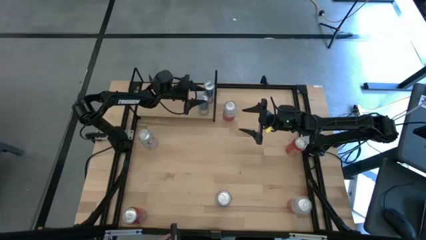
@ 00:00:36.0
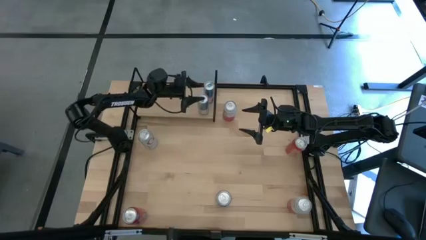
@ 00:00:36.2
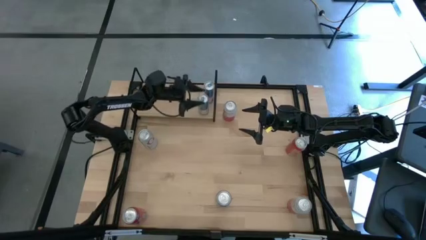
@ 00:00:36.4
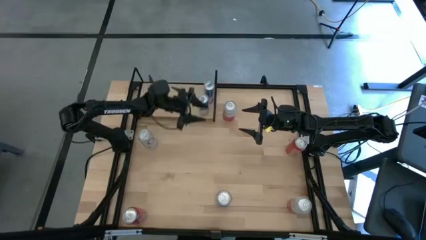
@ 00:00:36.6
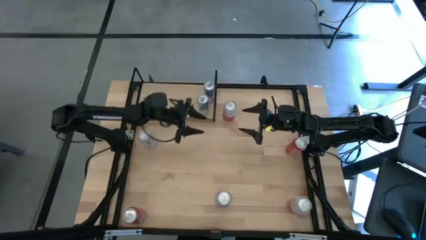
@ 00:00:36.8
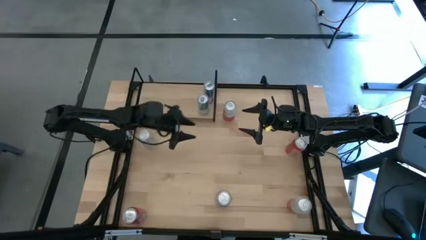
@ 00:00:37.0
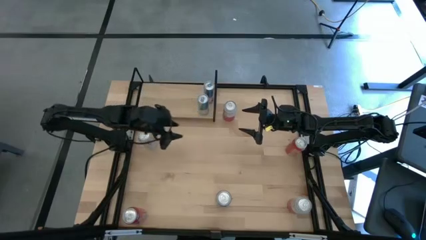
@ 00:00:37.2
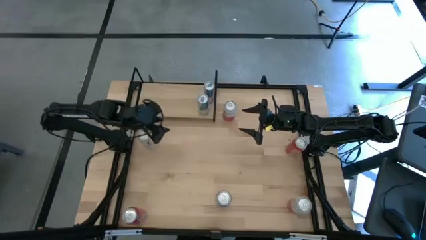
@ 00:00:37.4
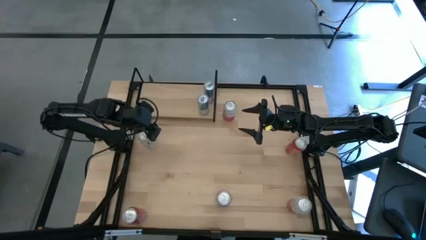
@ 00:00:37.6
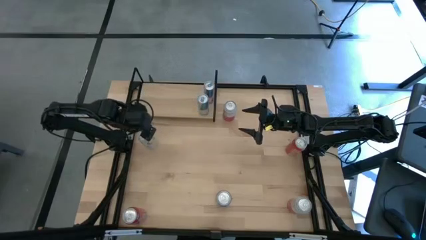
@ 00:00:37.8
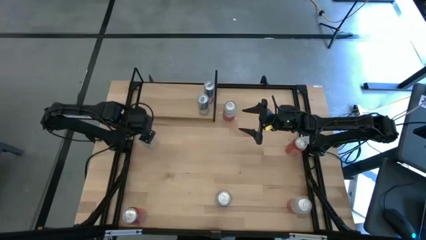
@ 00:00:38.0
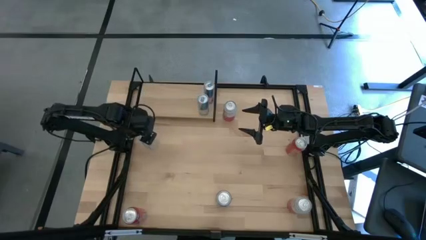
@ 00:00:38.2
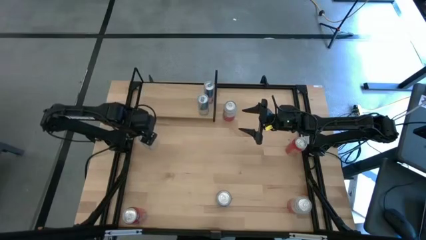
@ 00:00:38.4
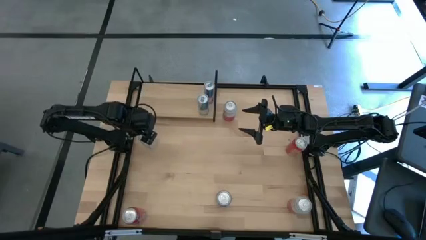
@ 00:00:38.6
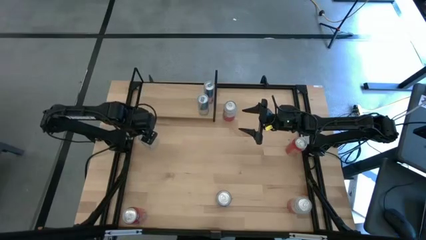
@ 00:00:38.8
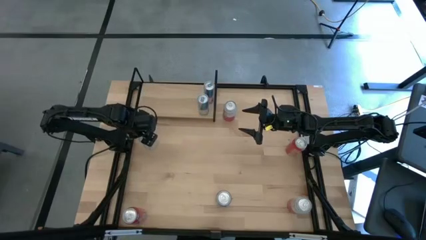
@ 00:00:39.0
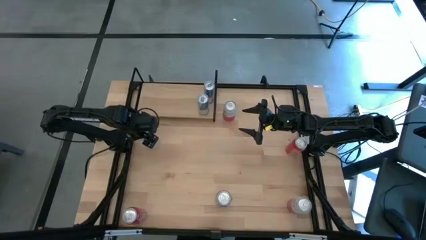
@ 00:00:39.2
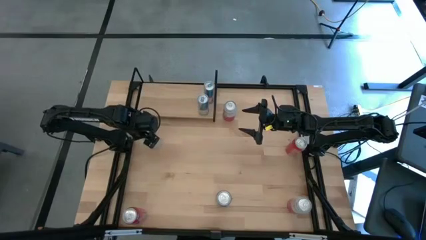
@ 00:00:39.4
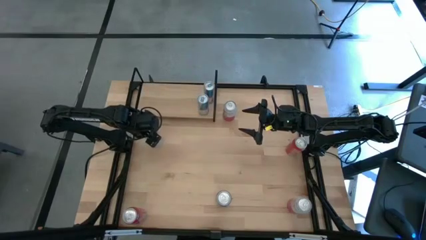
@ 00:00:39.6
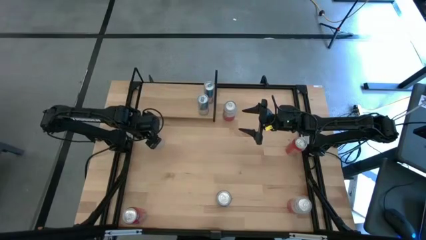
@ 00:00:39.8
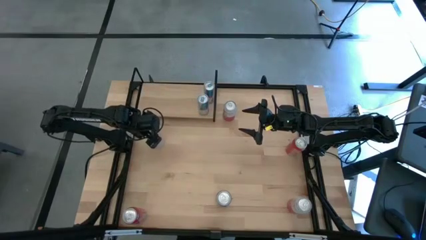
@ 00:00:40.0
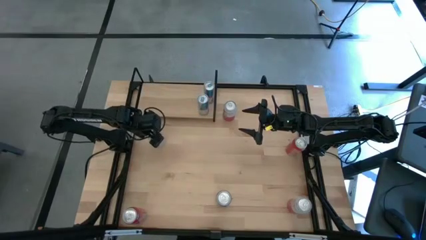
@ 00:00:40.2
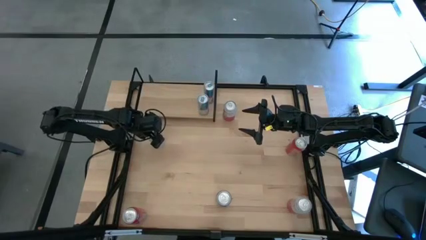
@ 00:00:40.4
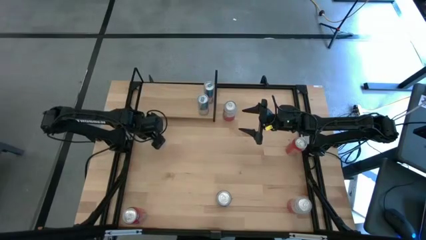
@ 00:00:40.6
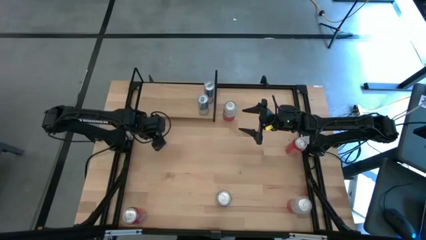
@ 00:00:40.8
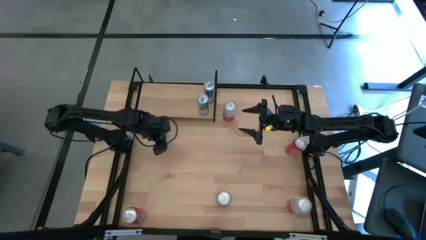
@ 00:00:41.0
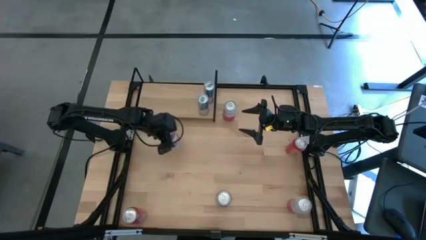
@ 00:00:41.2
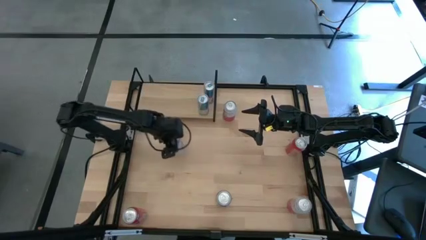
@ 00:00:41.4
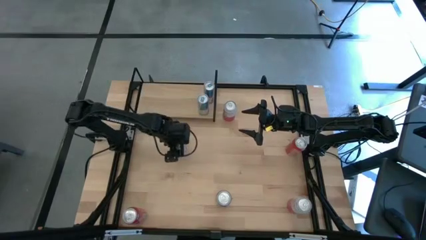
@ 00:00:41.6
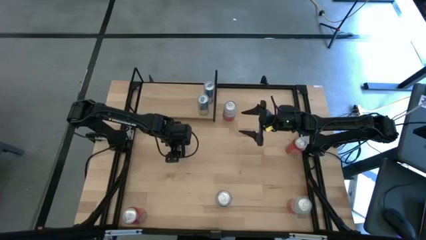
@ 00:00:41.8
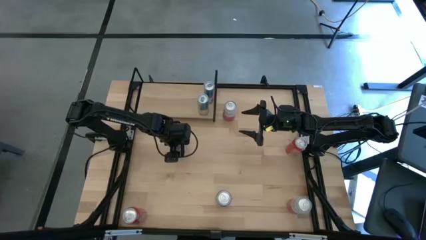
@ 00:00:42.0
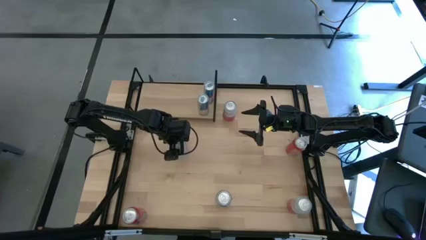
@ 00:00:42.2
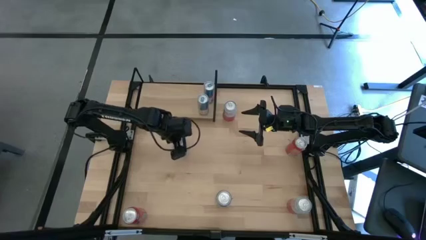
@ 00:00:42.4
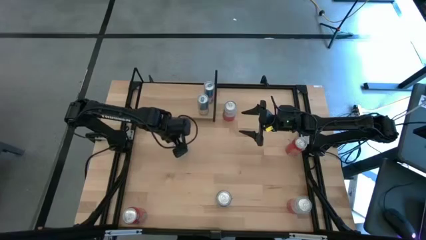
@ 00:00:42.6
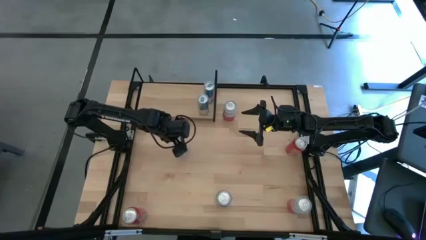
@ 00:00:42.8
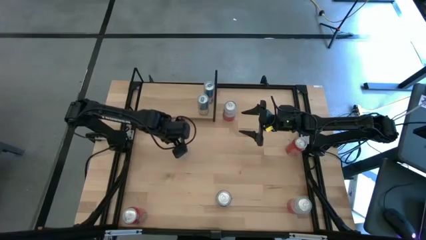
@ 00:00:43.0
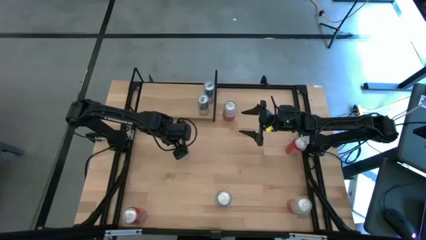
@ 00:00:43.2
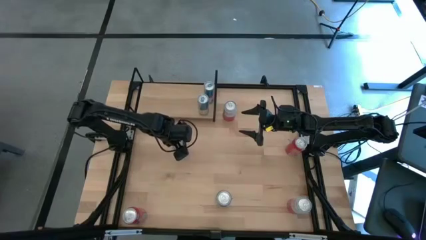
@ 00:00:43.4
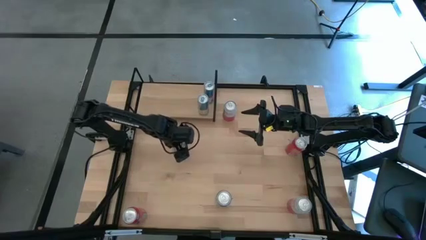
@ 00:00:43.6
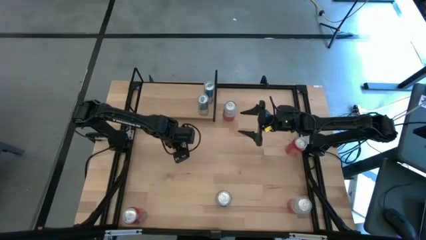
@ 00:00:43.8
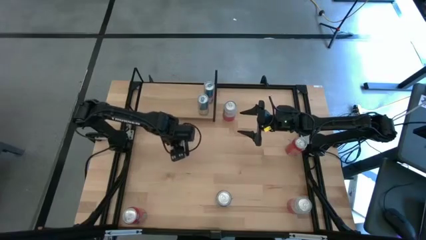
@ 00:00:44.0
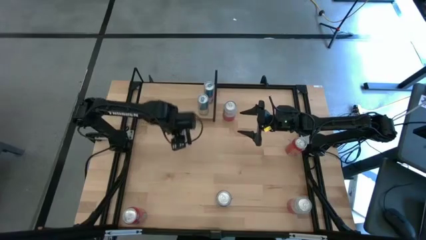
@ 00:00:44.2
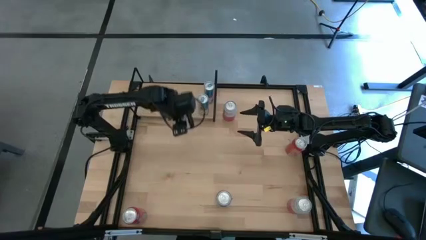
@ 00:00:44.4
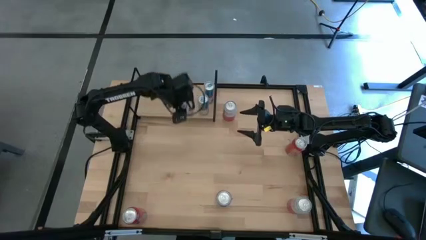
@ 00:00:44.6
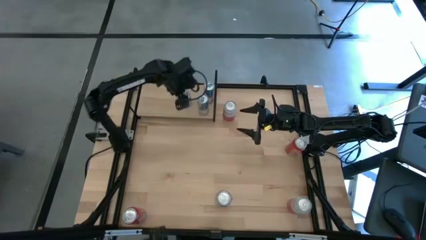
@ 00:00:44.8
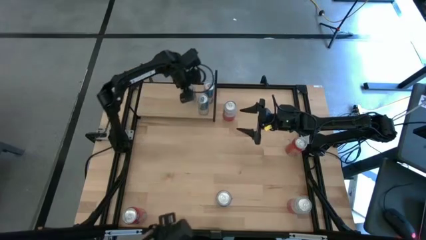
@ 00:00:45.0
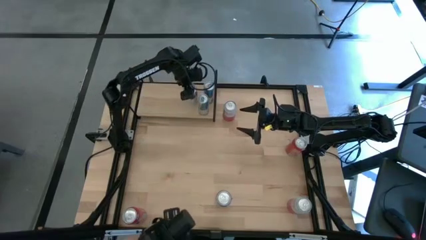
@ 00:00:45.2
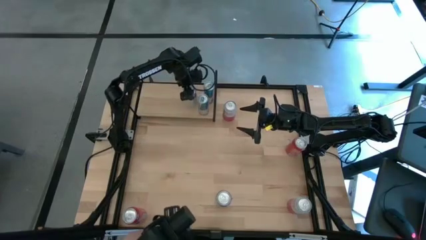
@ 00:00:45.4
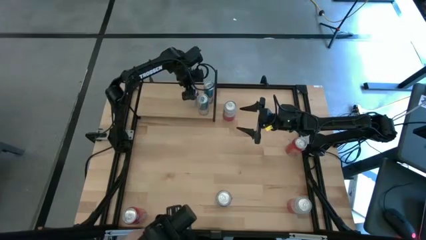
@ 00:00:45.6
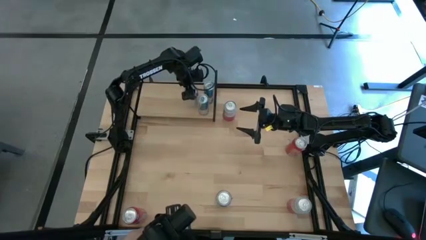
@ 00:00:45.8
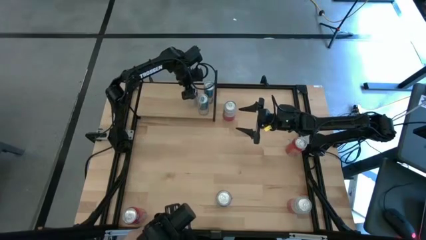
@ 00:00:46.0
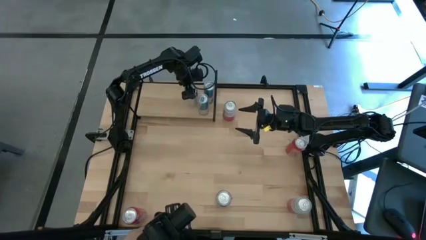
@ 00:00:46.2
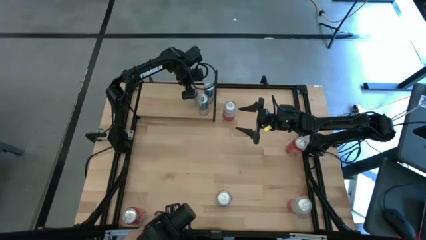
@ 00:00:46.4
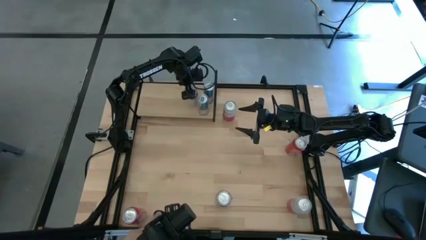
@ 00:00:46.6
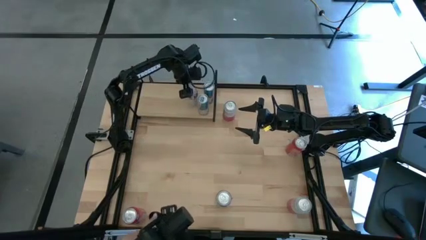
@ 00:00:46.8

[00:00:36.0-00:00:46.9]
Task: Place canned beverage on shelf
Put the top red and silver soda can on the shelf
